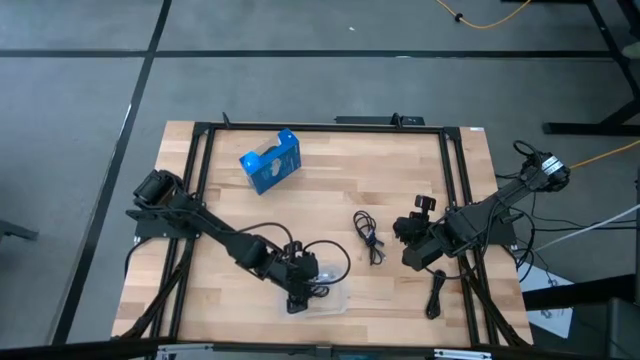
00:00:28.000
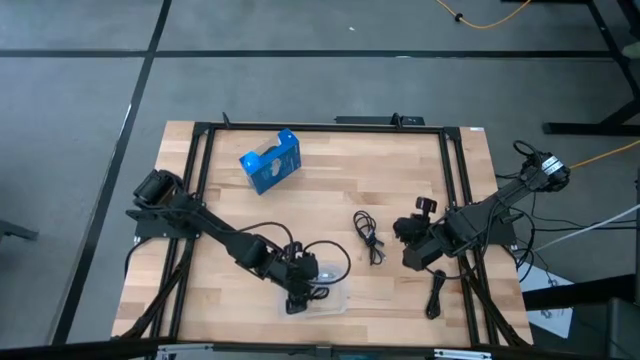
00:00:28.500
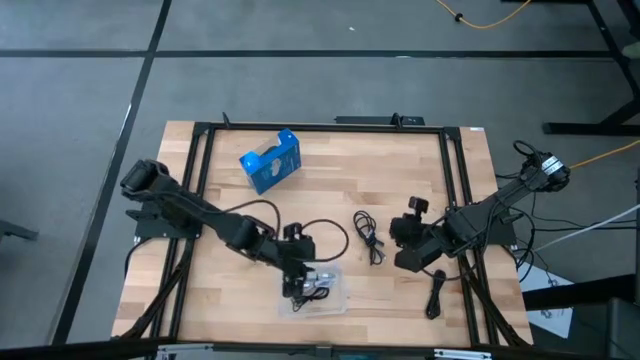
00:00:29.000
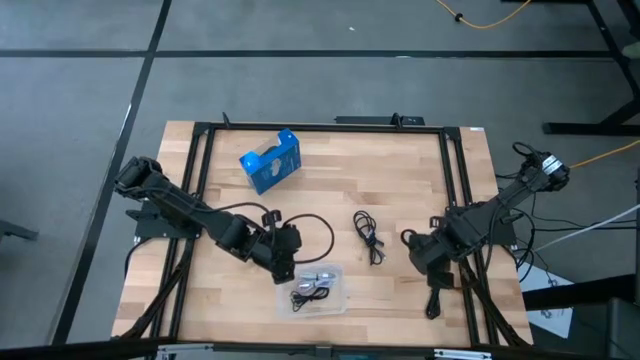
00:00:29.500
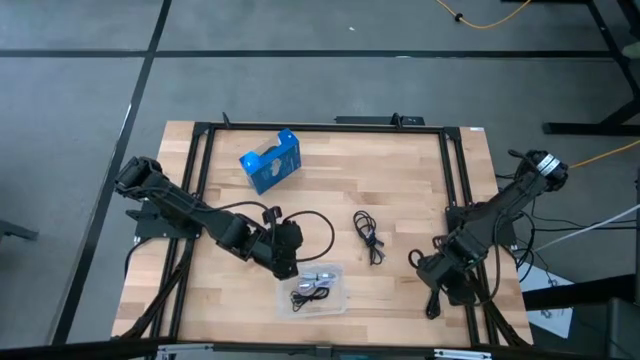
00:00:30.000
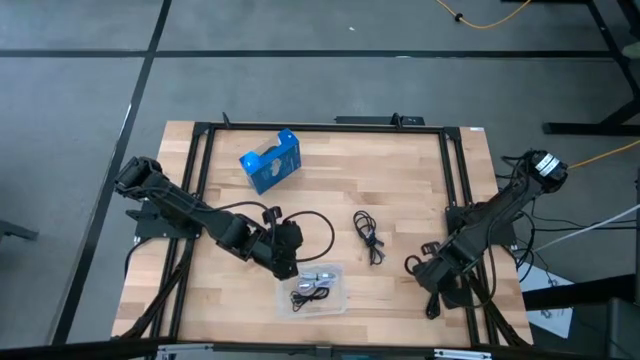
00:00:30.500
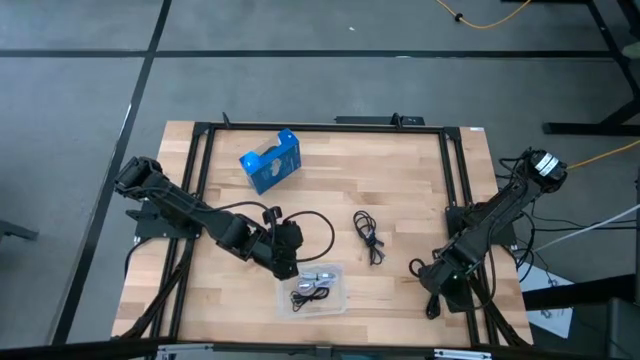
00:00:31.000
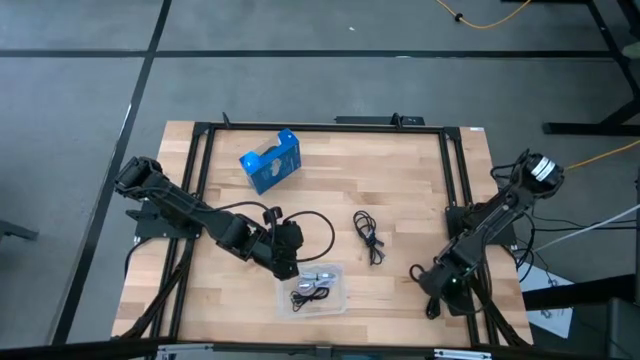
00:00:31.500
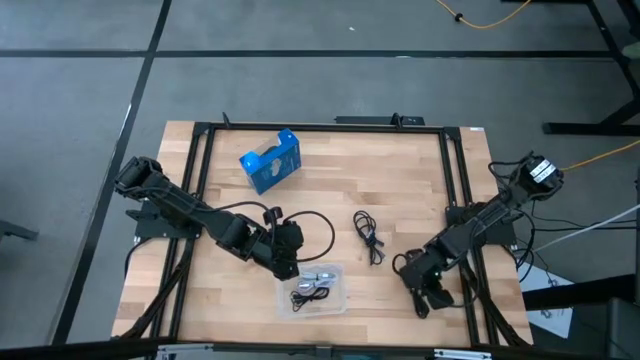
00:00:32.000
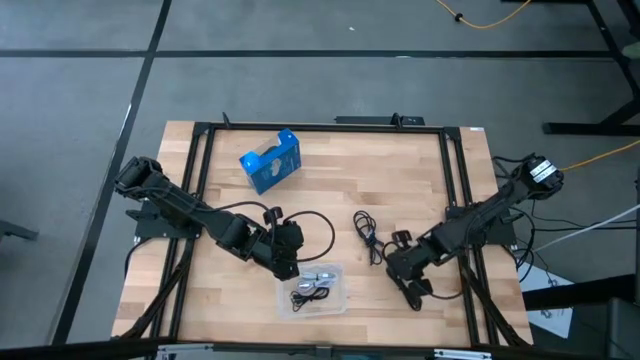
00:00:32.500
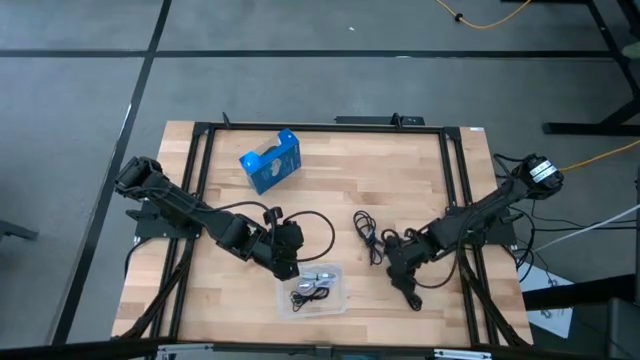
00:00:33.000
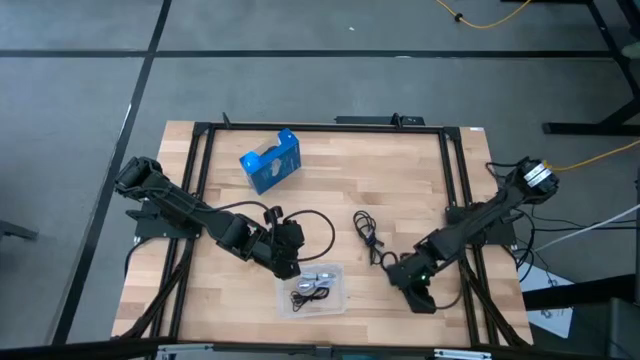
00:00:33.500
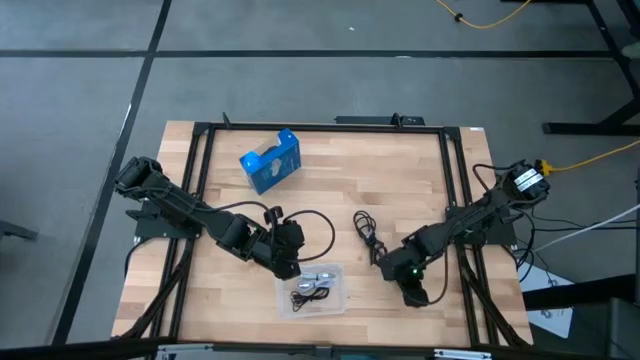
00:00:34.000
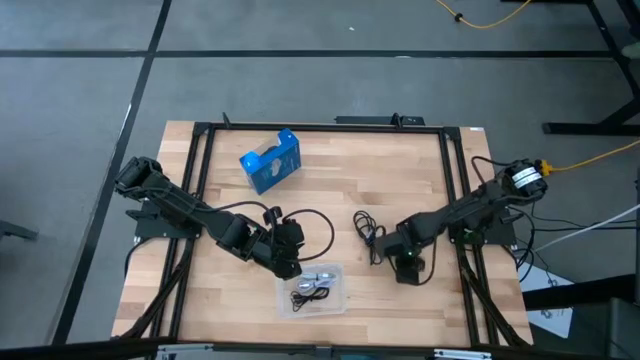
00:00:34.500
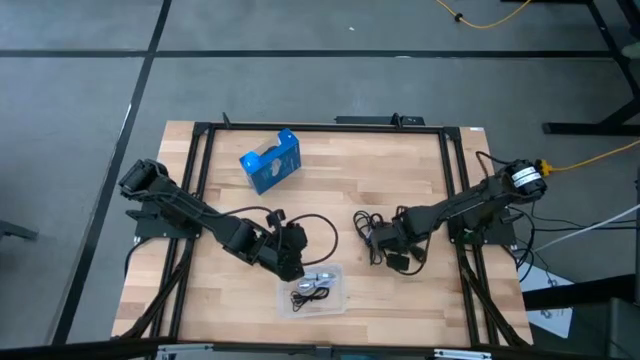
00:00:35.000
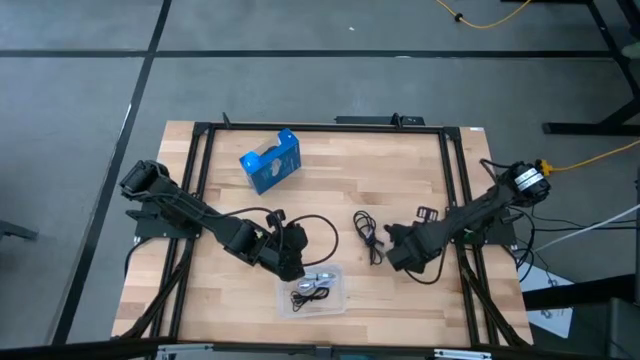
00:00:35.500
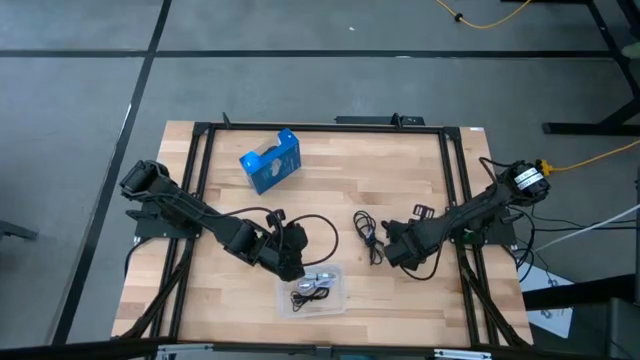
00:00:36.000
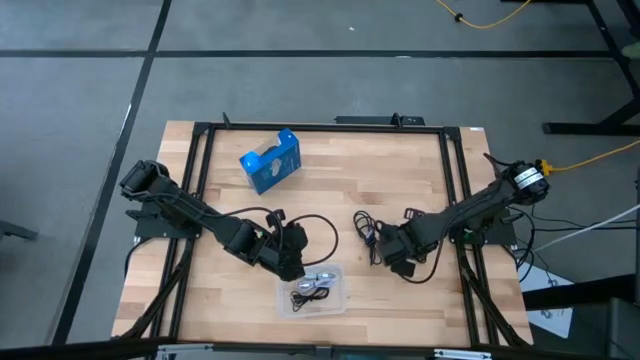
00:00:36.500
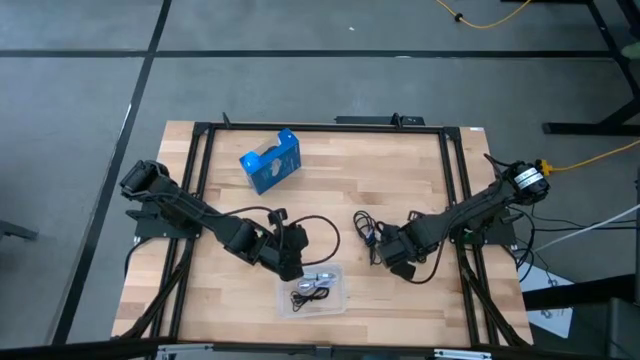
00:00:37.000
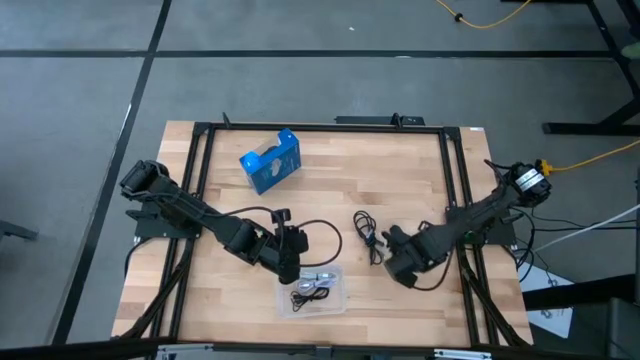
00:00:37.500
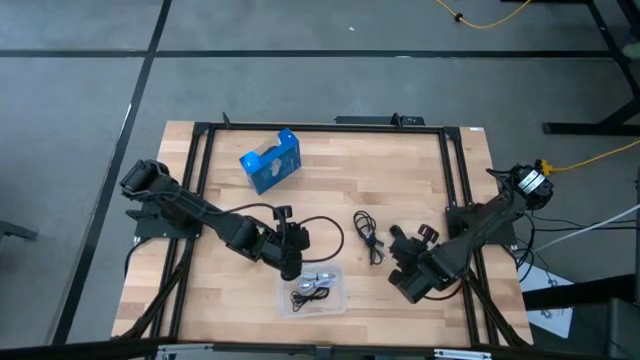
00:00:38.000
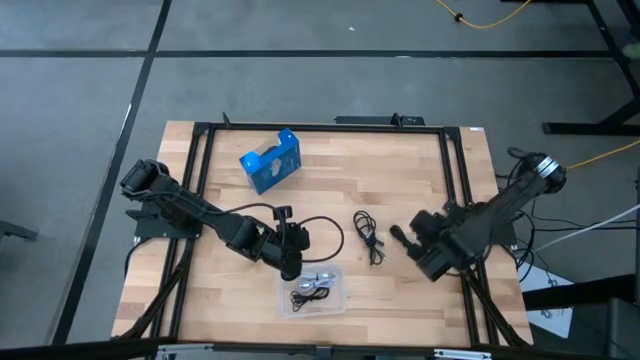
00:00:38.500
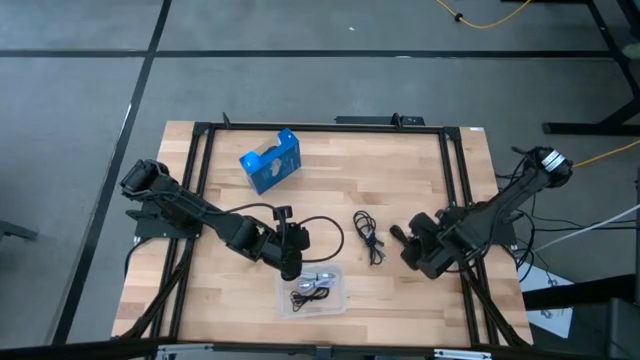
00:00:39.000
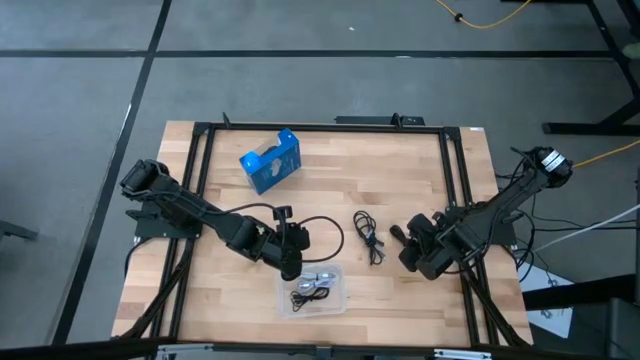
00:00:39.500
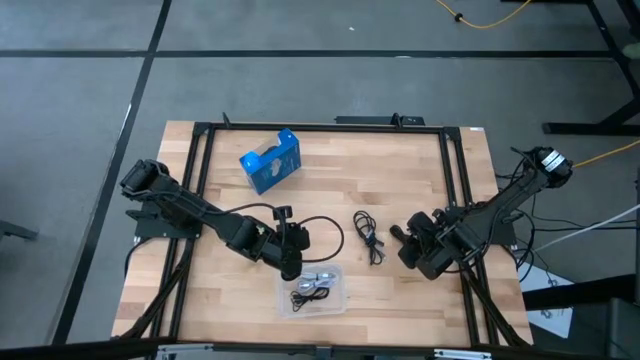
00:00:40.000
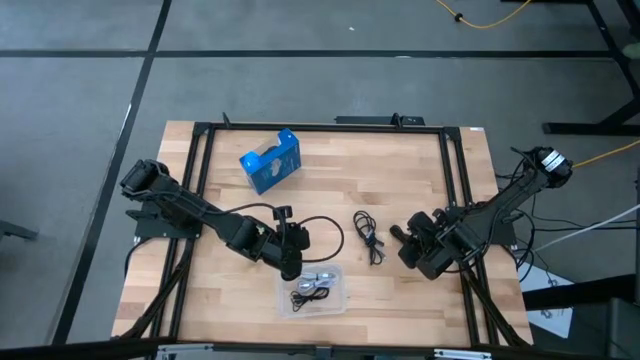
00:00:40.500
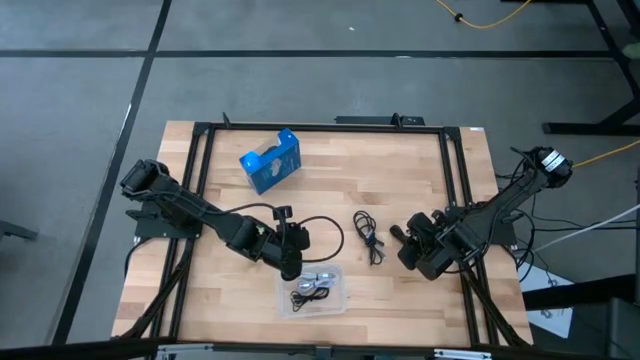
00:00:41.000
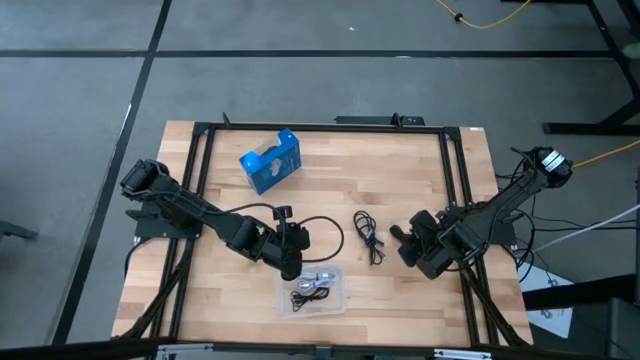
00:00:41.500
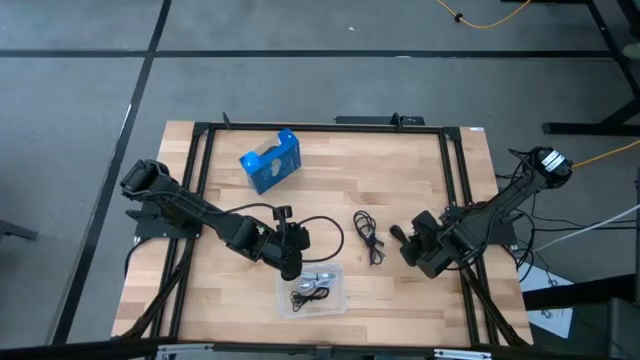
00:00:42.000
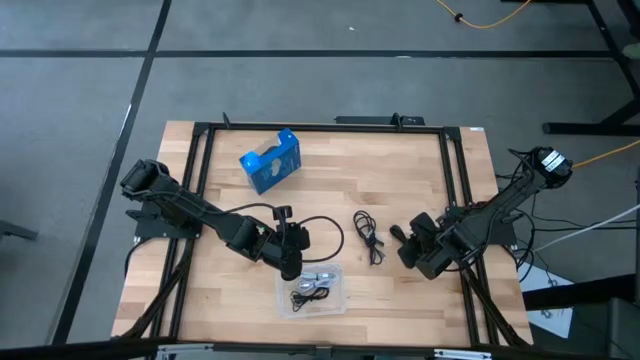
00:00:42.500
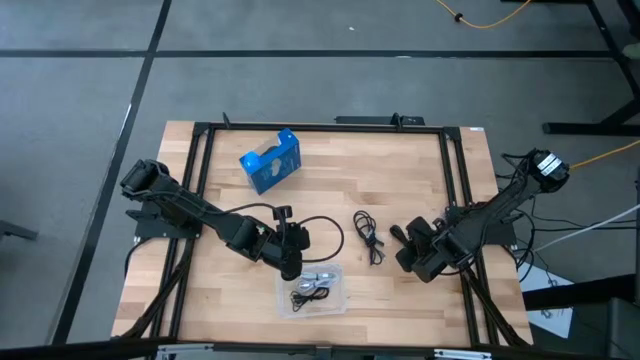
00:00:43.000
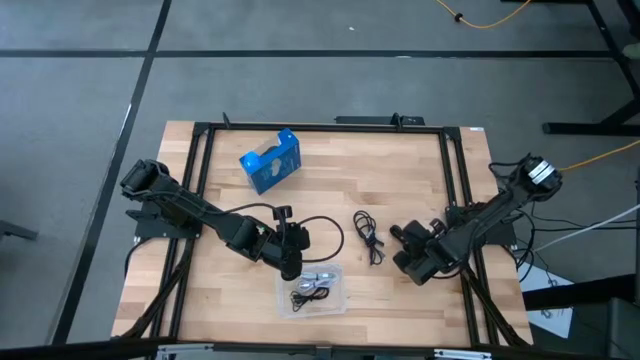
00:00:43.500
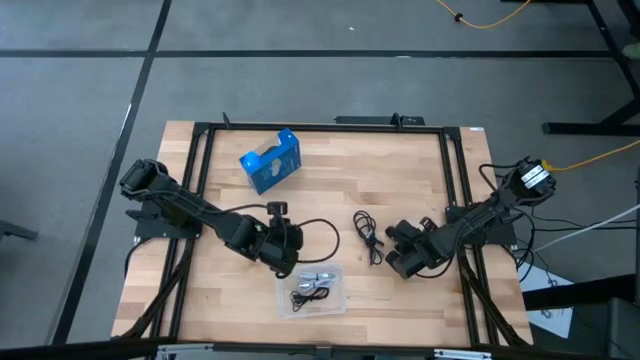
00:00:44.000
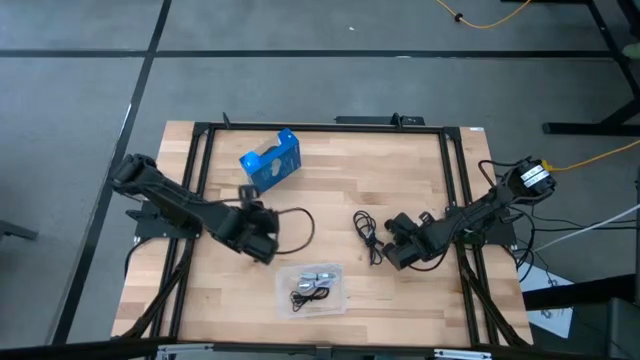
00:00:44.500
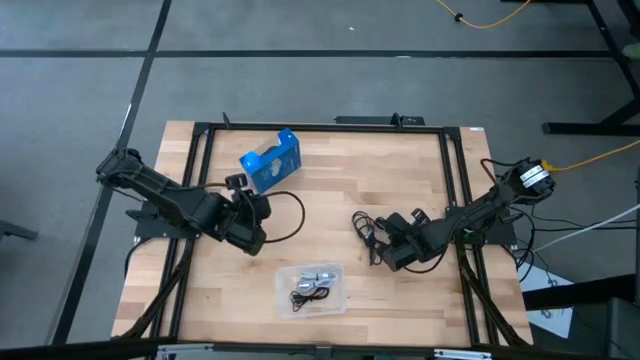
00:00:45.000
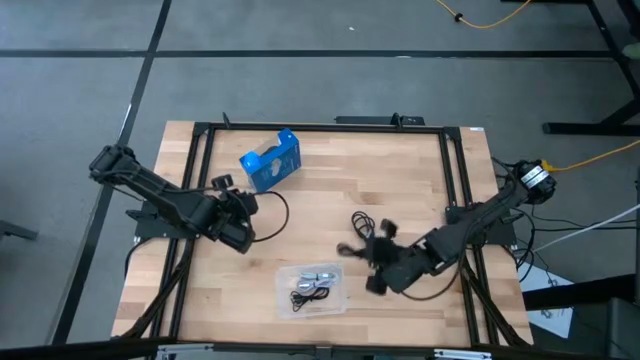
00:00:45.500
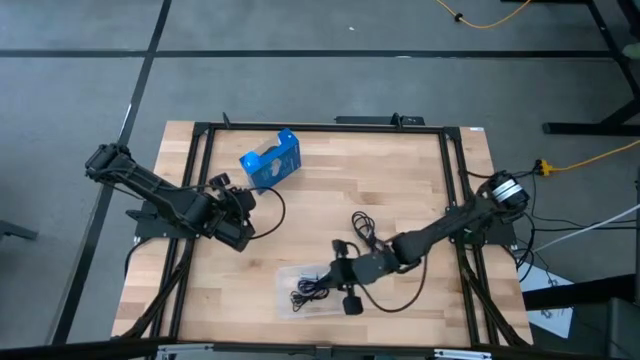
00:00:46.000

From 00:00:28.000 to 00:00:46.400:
Task: Pick and place USB-C Cables
Put the bottom black charger cable into the transparent bin

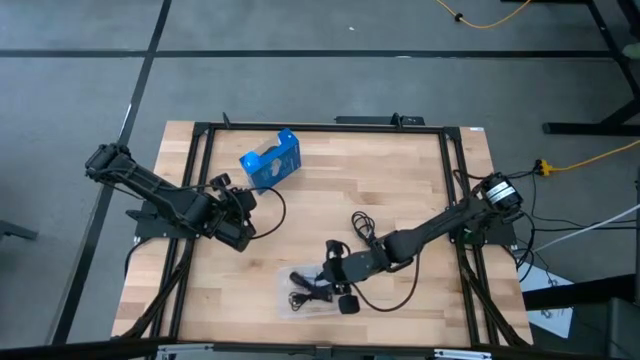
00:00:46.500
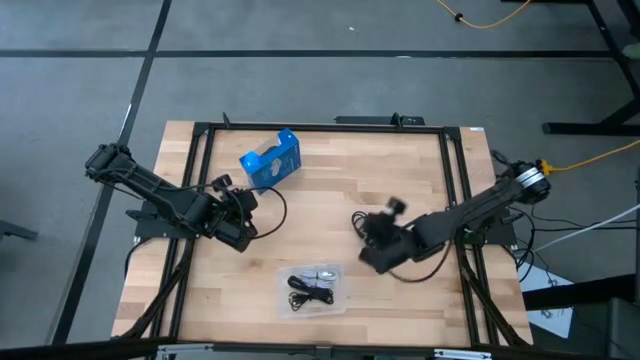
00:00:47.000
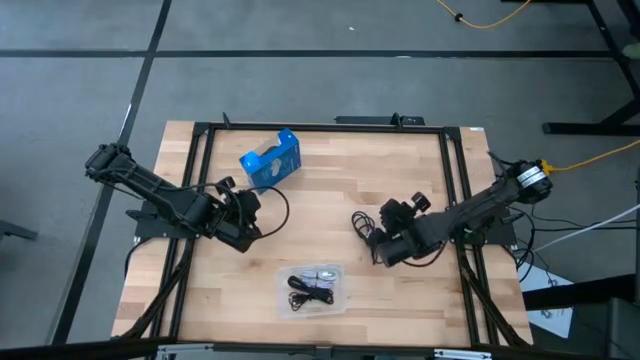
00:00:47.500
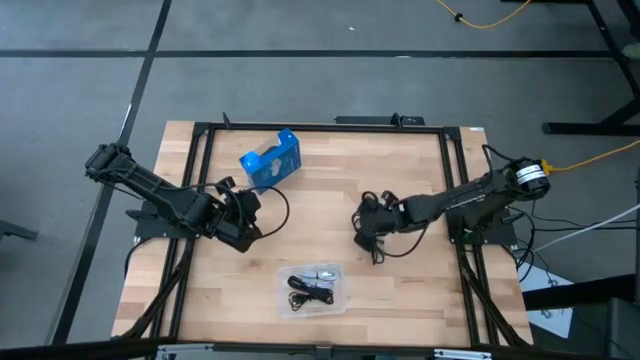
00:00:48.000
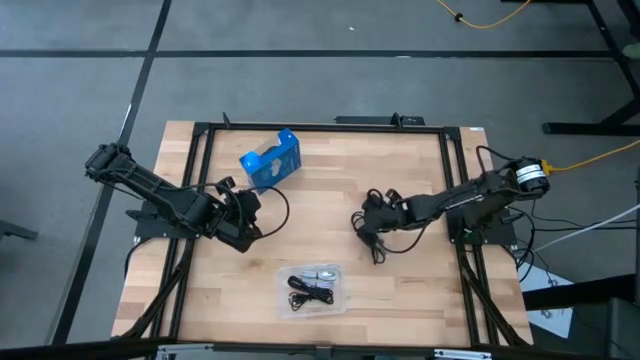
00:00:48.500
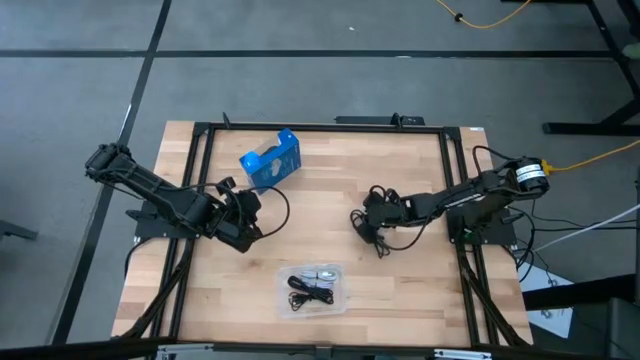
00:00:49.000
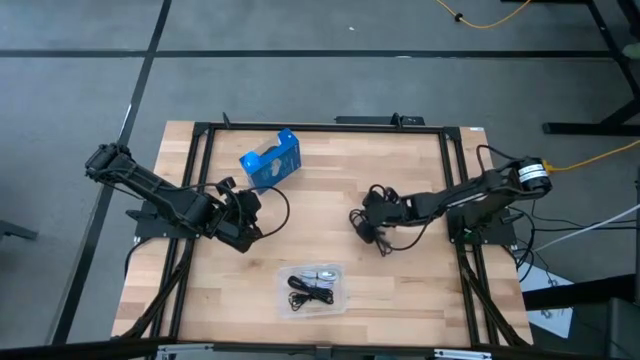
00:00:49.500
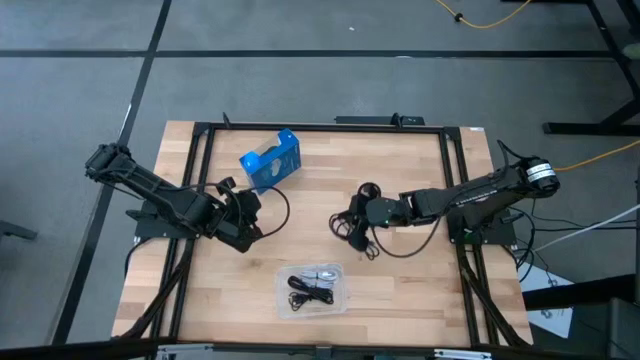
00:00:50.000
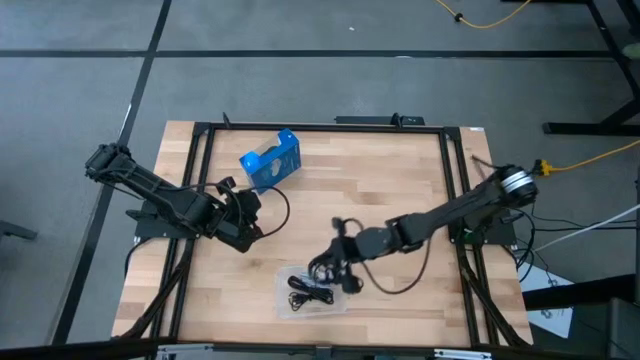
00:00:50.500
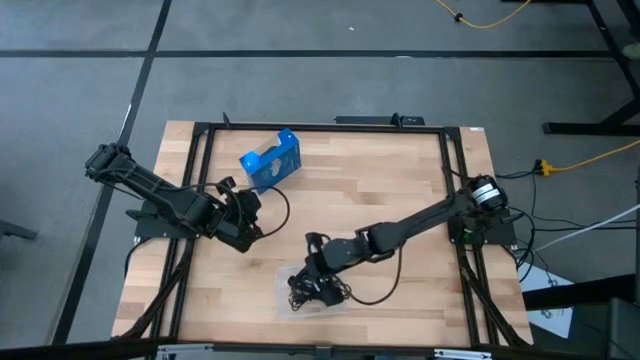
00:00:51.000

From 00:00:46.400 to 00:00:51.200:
Put the black charger cable into the transparent bin
